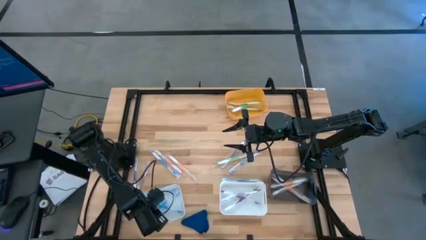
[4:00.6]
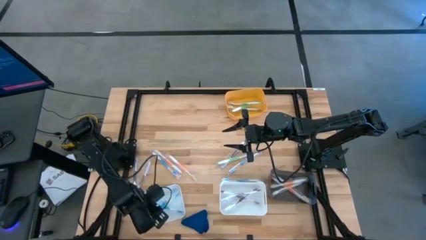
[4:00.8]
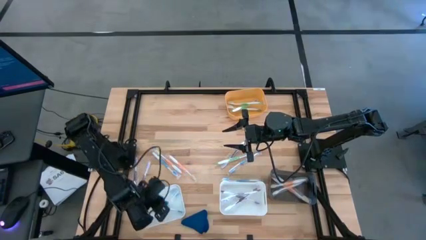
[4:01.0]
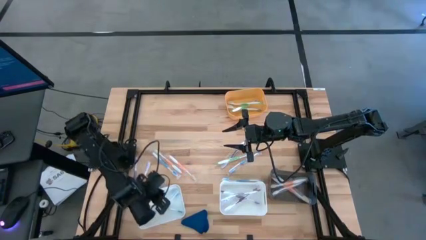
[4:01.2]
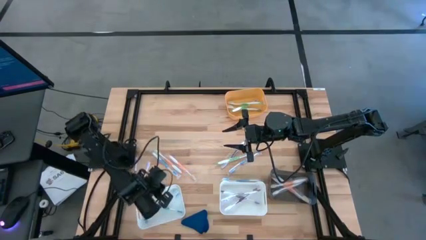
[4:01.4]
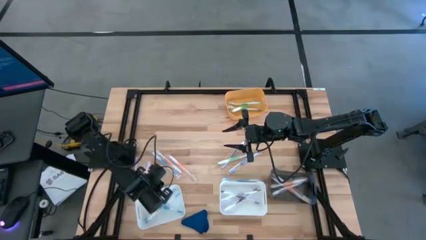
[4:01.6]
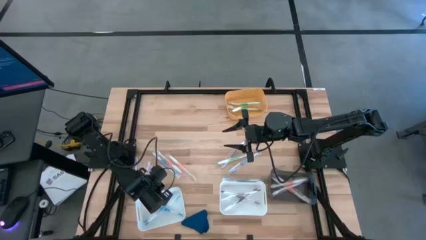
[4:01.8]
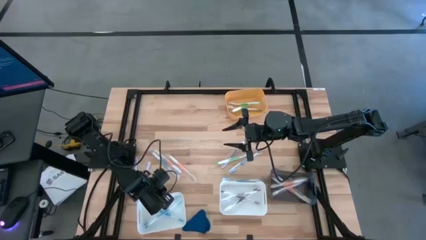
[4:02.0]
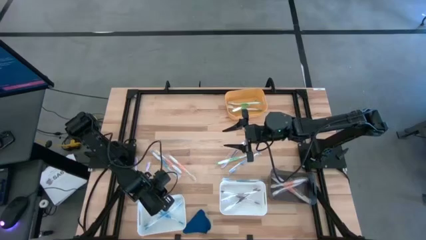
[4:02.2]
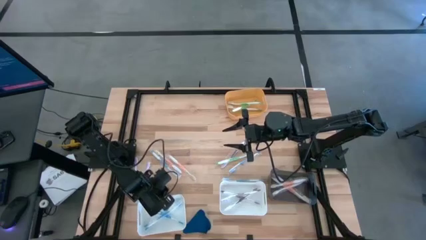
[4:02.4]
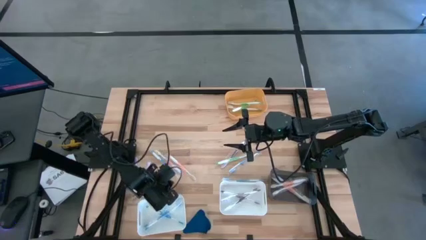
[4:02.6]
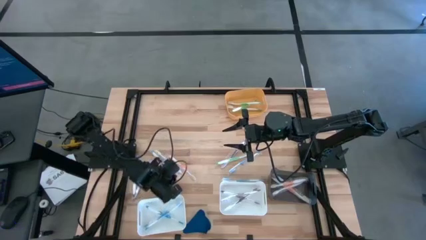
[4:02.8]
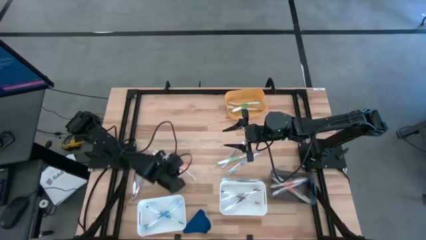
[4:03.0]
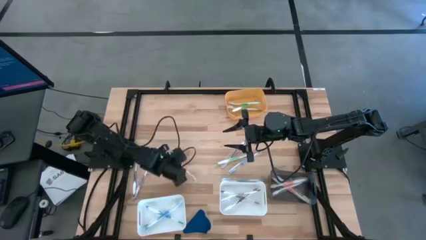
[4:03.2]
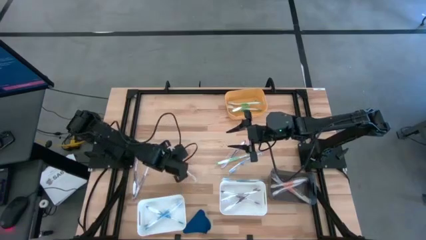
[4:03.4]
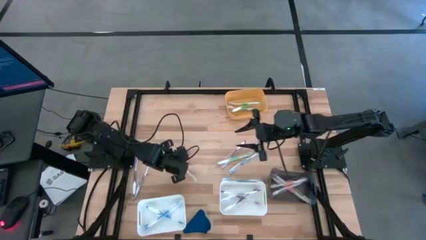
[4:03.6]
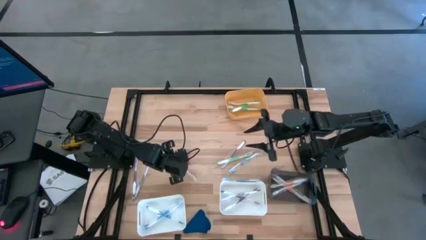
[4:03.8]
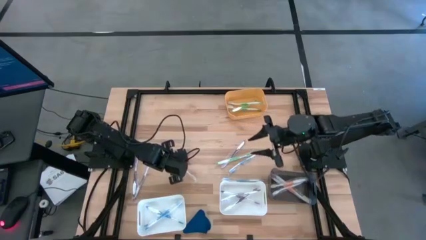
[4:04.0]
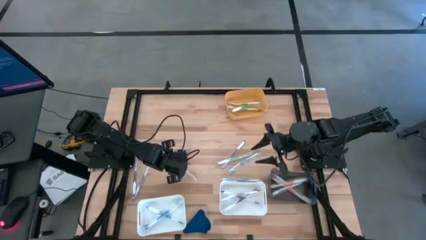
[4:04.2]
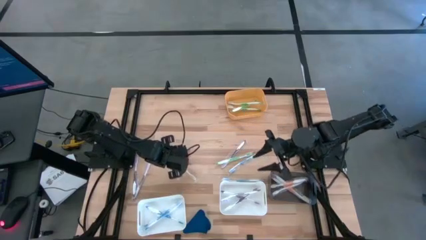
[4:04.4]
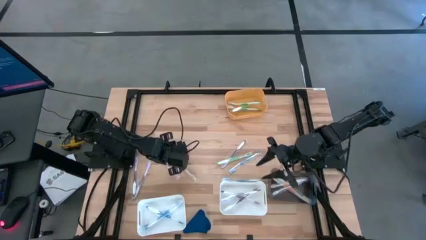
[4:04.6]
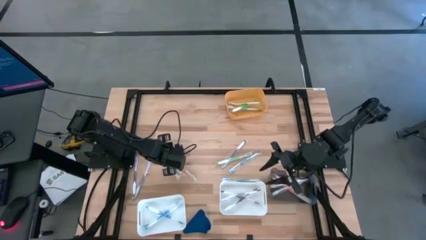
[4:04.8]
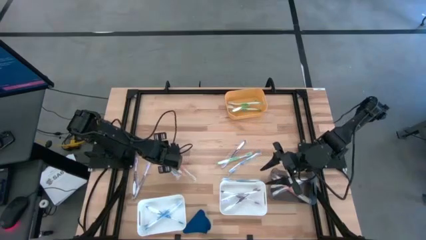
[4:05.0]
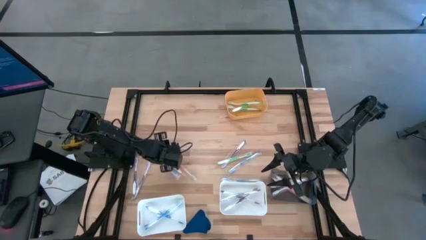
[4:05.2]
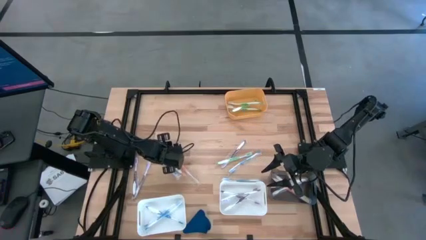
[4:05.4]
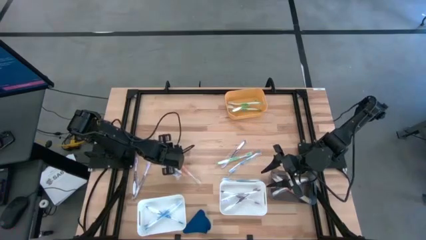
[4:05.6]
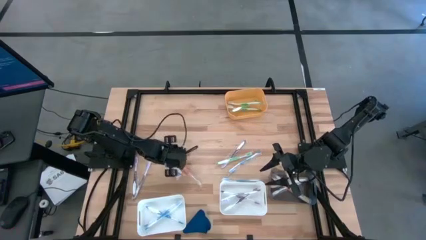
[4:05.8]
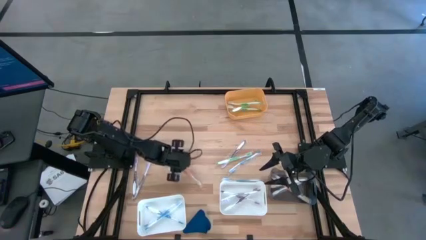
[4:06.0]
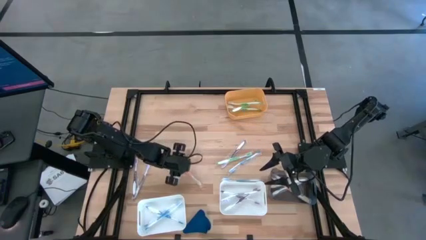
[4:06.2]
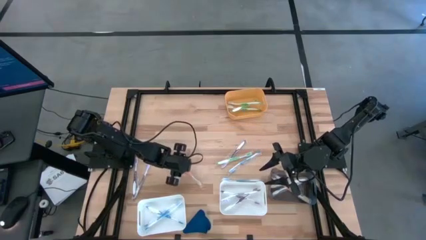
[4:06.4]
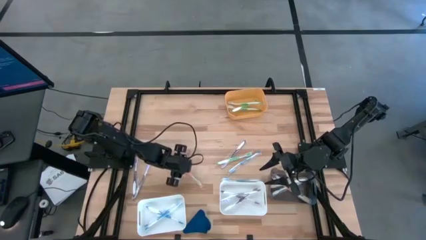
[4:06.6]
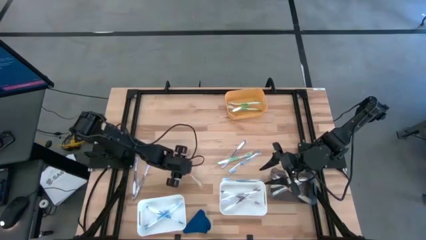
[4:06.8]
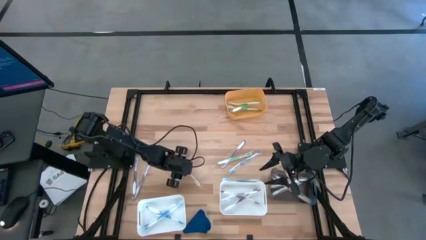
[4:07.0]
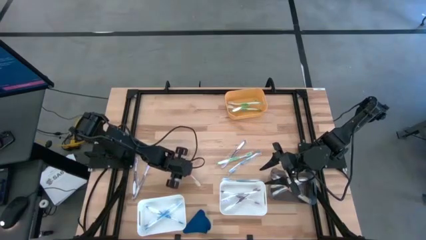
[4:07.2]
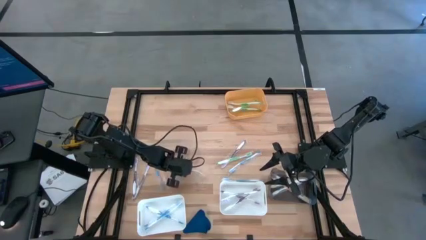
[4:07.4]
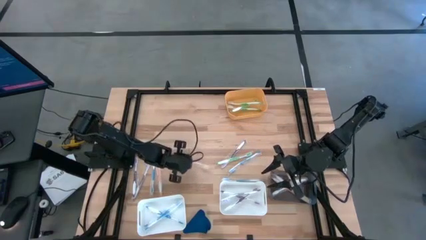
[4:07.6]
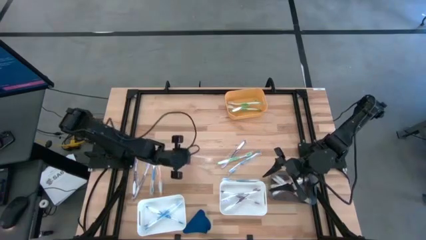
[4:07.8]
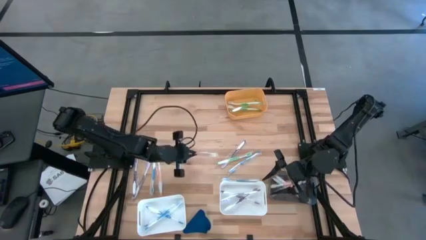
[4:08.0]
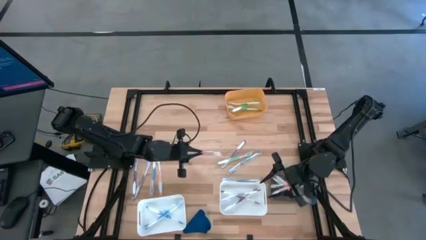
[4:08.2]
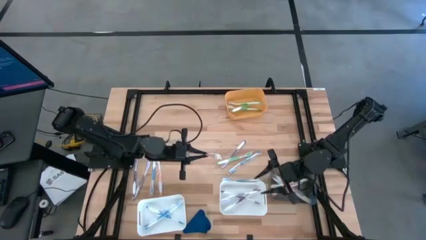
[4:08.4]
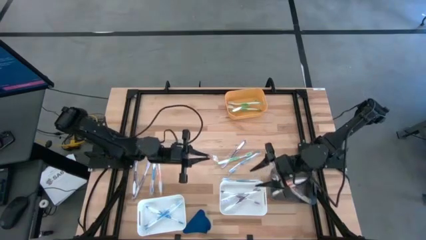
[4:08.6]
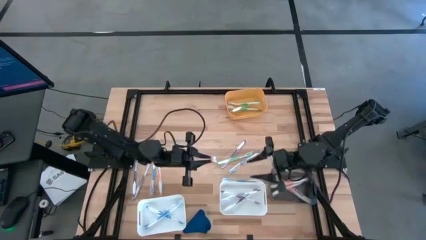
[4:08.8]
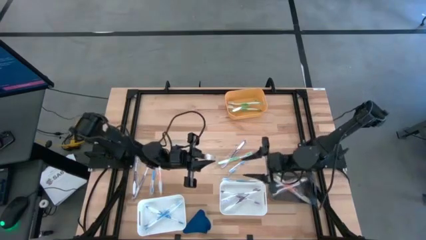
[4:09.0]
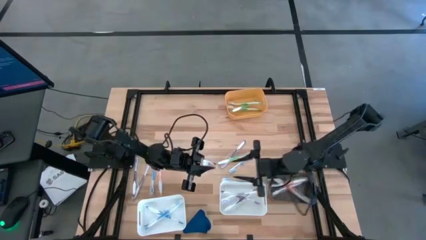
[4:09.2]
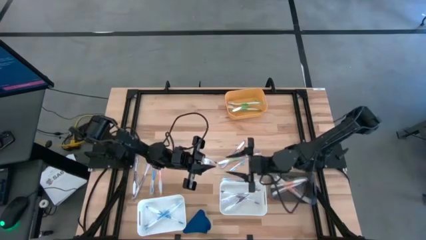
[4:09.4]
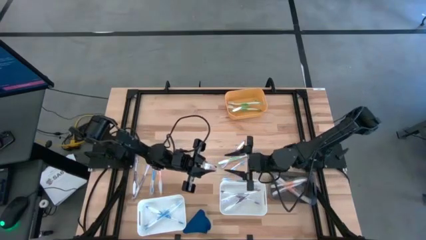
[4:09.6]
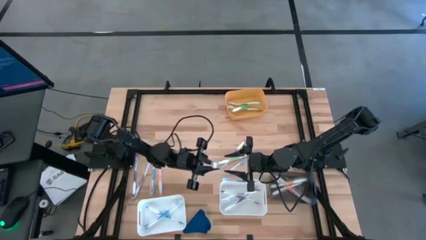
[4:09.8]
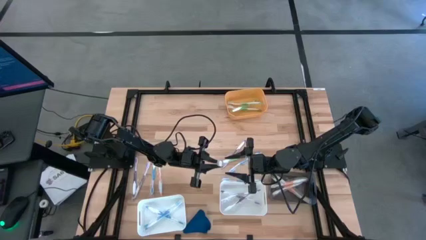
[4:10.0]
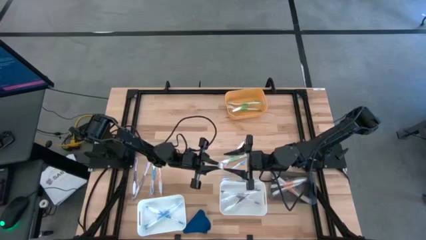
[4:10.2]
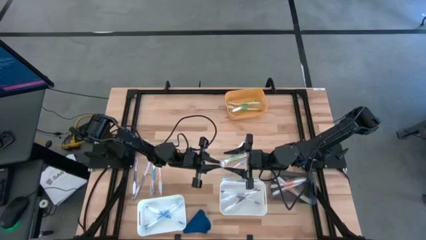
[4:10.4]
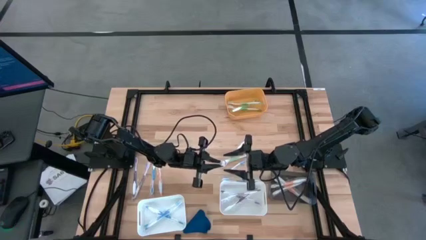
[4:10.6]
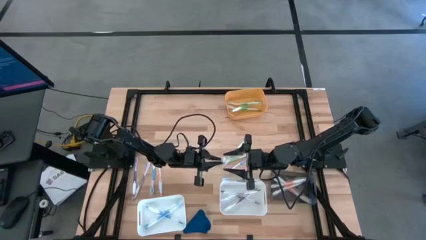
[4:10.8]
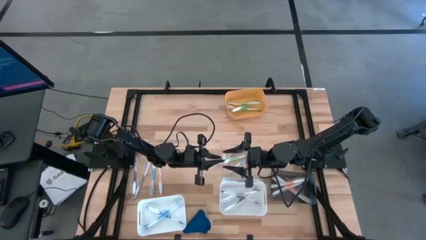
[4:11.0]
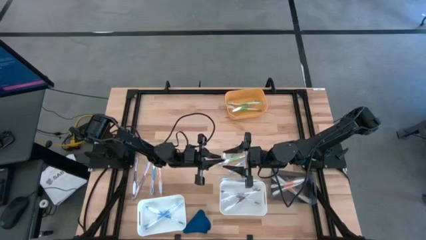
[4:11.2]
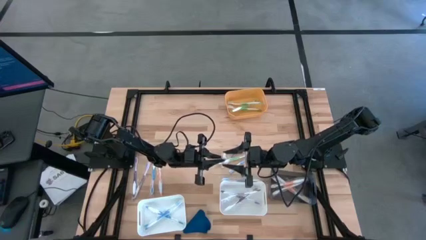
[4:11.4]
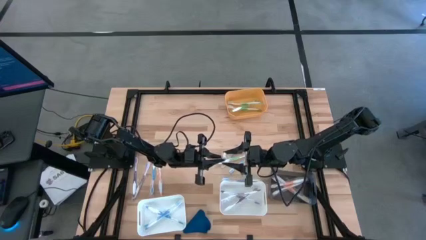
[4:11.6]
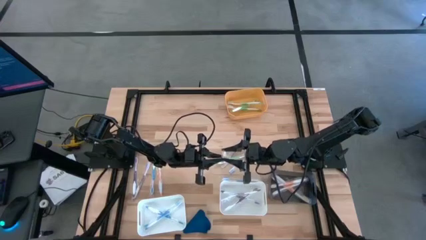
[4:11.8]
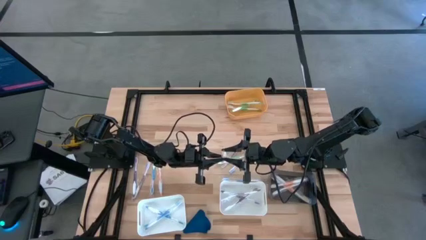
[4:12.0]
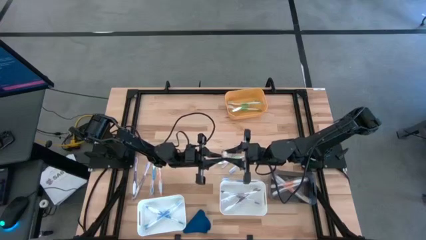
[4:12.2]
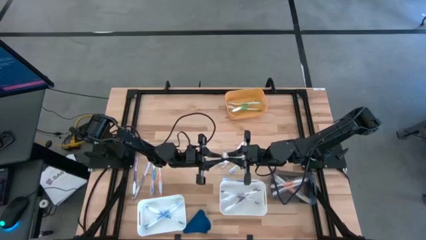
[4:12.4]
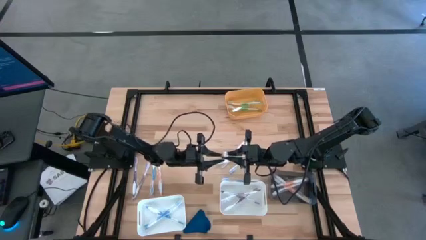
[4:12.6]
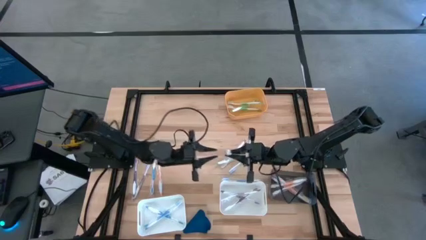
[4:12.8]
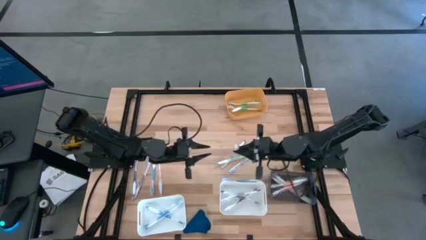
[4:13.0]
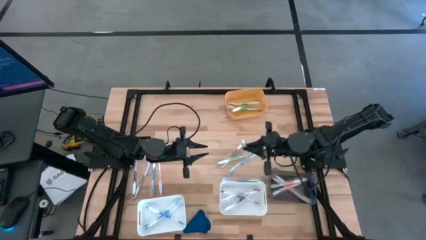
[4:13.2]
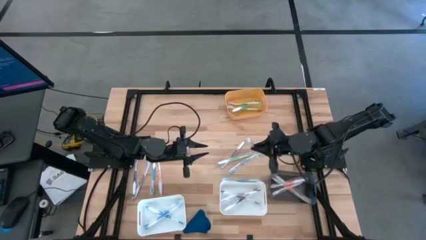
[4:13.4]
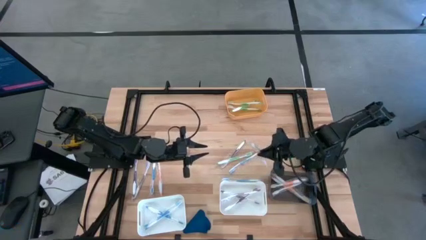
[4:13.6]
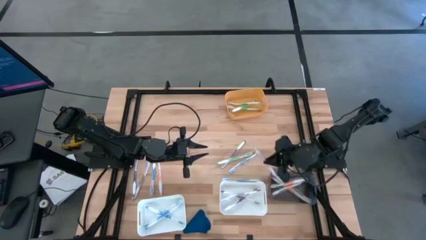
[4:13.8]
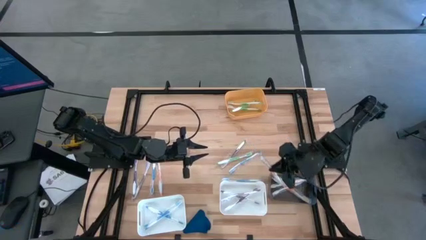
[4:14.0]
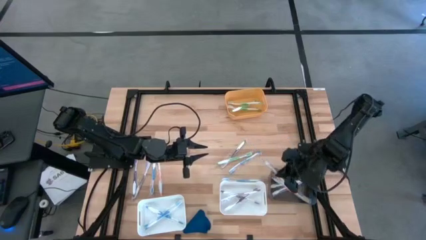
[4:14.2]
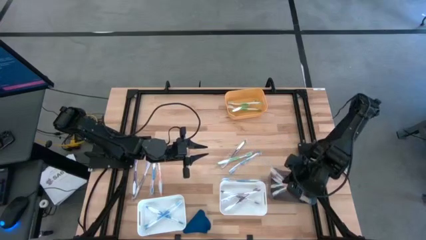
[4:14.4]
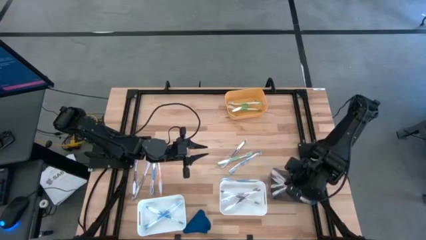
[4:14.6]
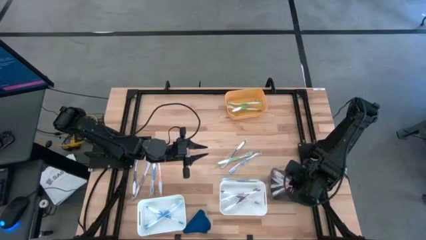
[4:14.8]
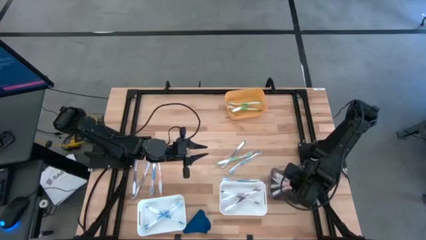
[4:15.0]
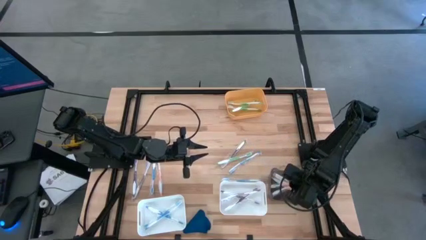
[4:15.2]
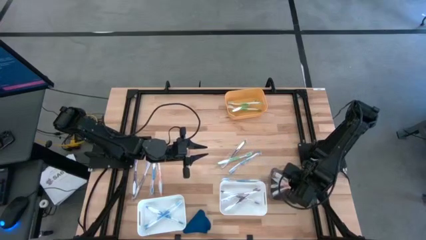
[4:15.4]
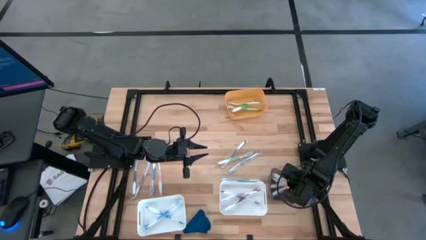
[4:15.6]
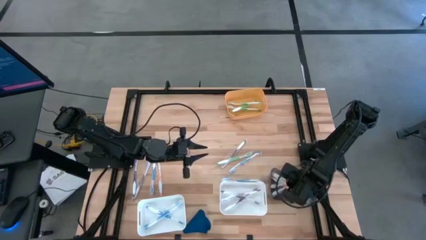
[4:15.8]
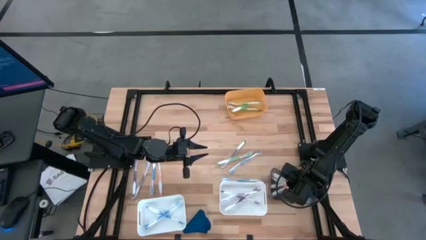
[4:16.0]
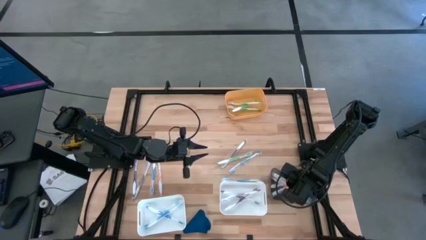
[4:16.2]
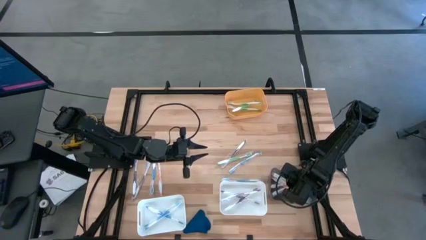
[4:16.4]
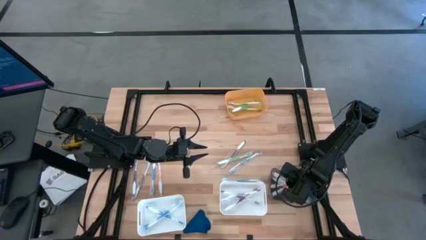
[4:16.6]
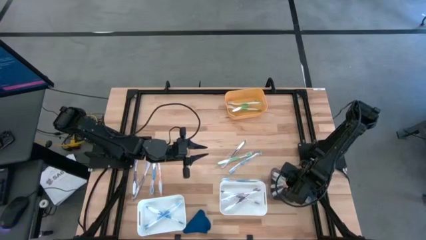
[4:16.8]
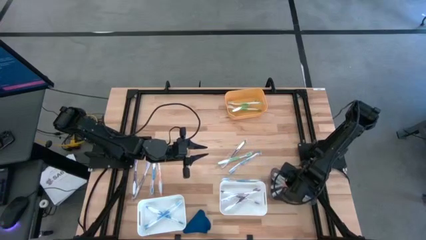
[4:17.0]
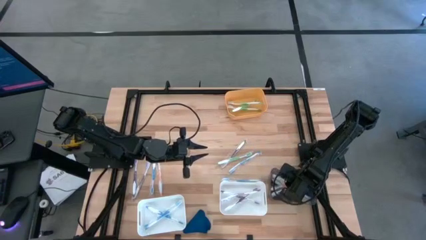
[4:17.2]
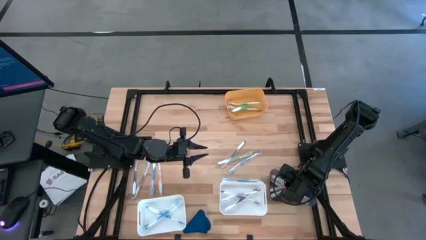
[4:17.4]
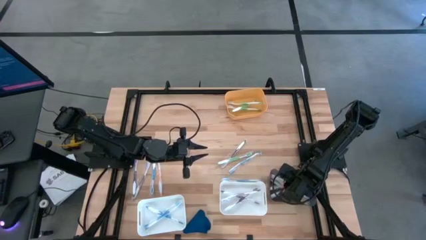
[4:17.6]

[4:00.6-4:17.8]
Task: Pick & Place Toothbrushes
Put the orange toothbrush into the black bin
